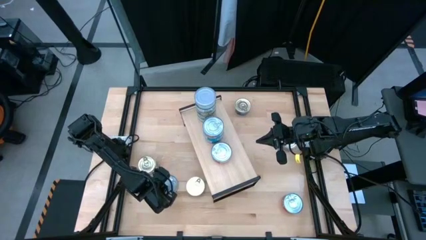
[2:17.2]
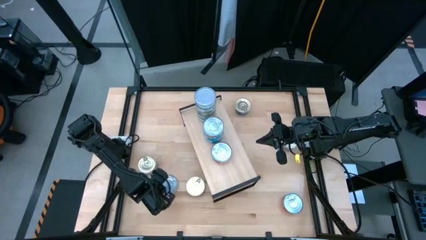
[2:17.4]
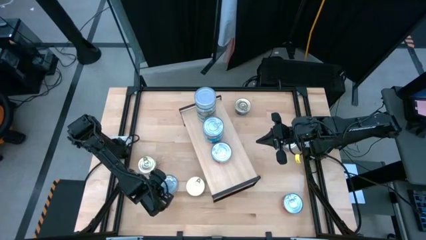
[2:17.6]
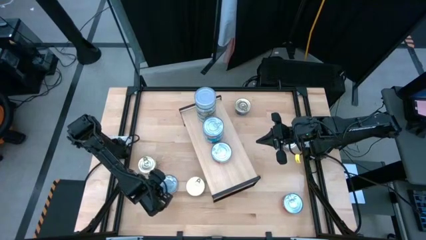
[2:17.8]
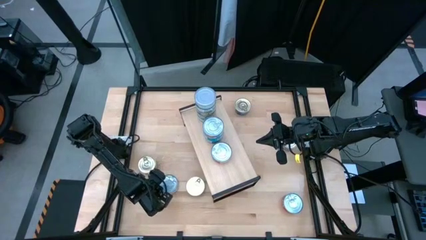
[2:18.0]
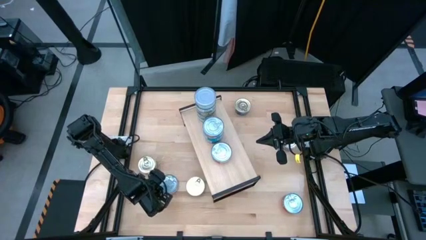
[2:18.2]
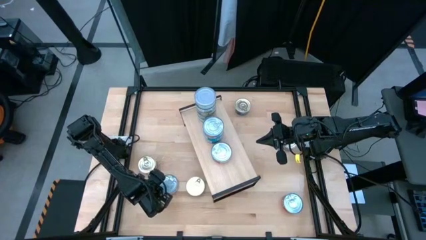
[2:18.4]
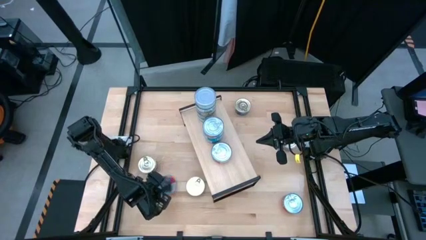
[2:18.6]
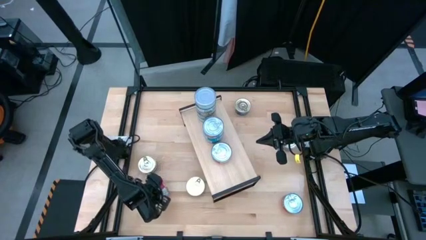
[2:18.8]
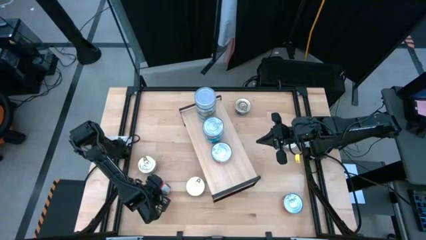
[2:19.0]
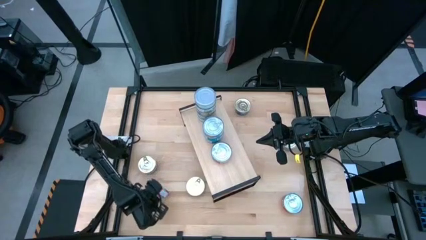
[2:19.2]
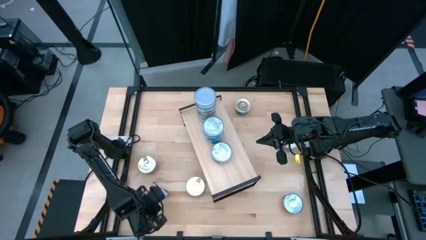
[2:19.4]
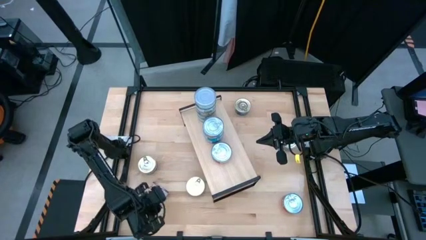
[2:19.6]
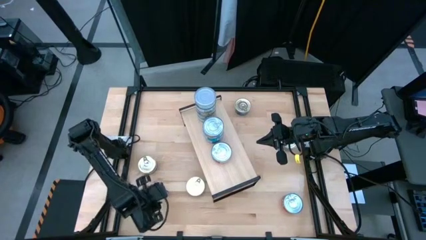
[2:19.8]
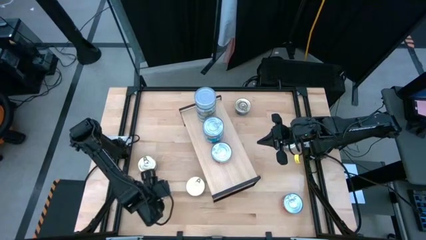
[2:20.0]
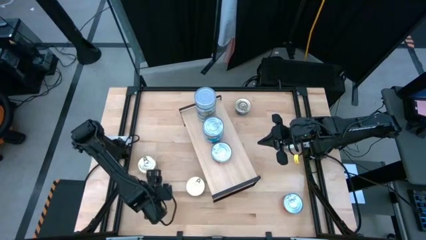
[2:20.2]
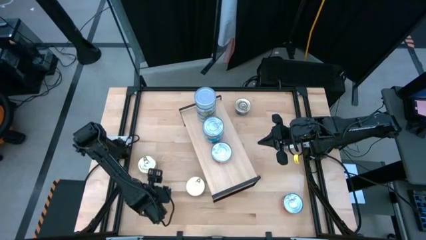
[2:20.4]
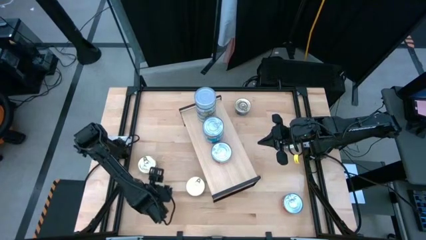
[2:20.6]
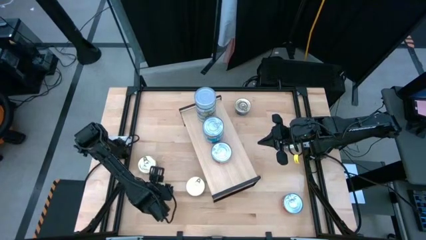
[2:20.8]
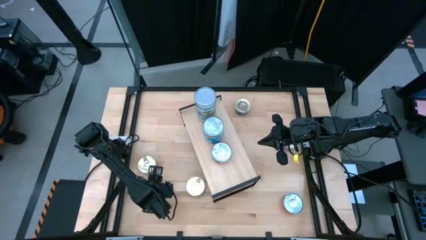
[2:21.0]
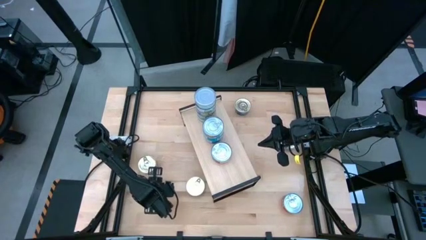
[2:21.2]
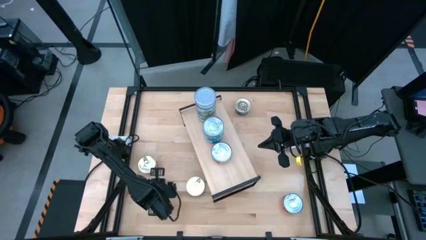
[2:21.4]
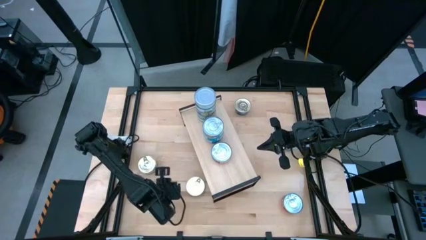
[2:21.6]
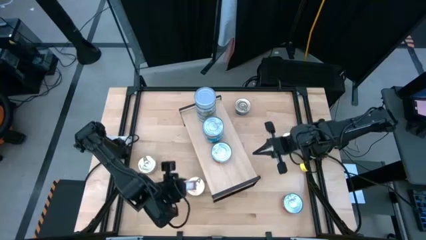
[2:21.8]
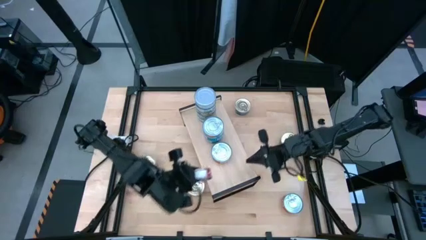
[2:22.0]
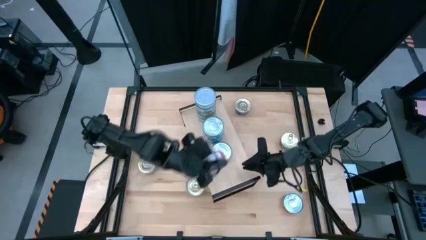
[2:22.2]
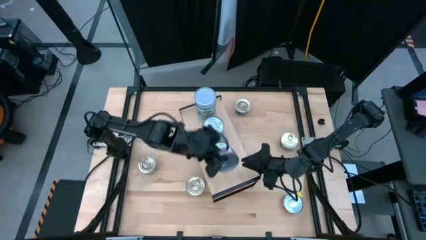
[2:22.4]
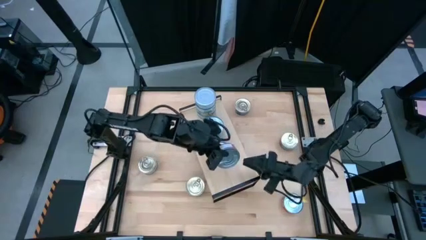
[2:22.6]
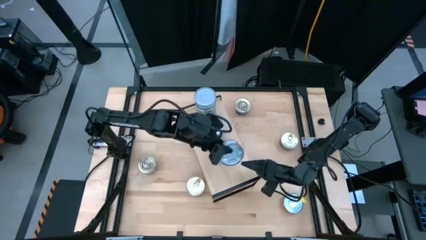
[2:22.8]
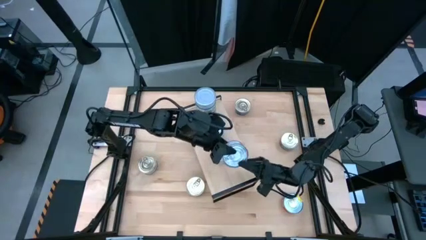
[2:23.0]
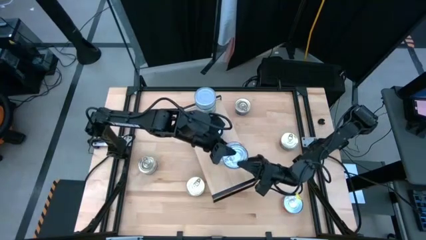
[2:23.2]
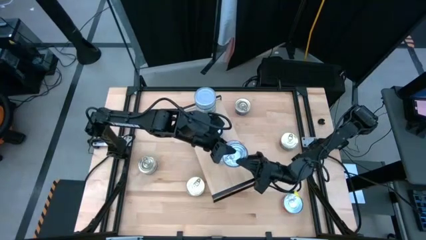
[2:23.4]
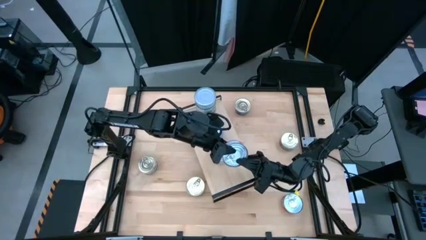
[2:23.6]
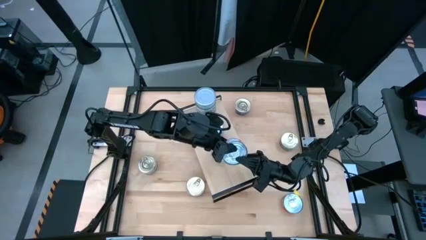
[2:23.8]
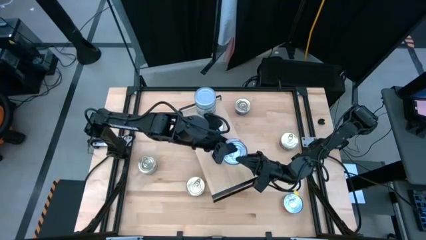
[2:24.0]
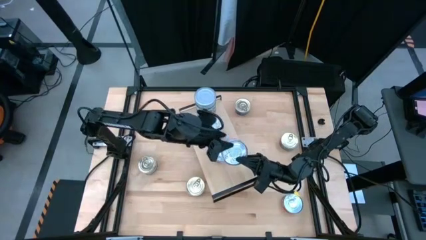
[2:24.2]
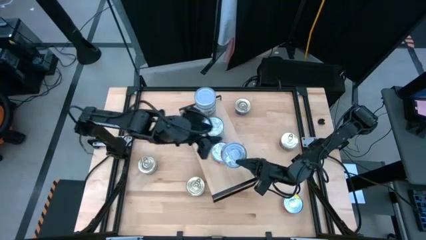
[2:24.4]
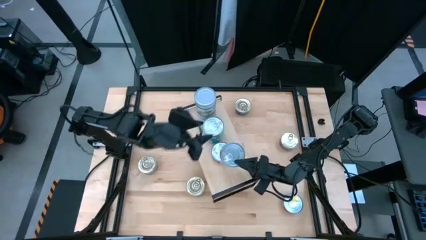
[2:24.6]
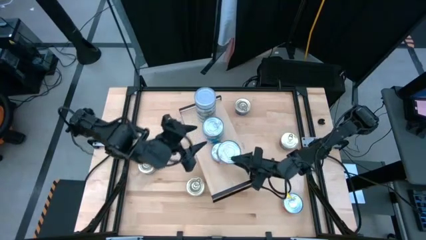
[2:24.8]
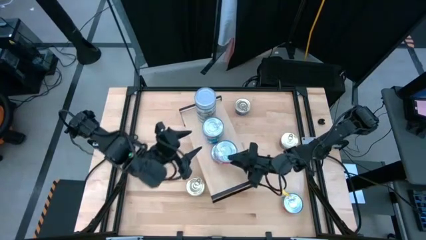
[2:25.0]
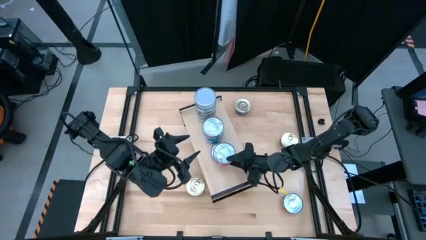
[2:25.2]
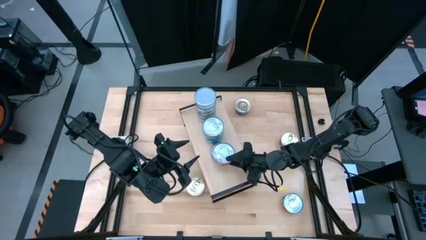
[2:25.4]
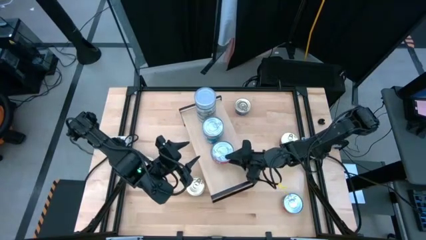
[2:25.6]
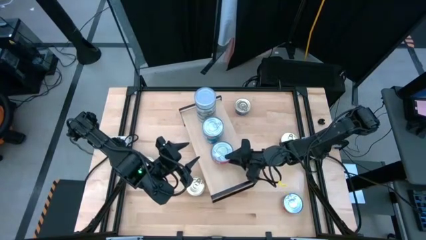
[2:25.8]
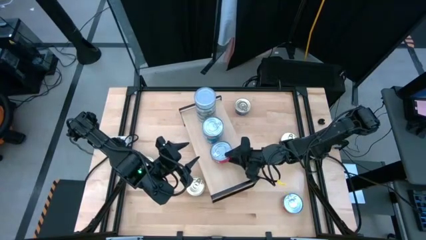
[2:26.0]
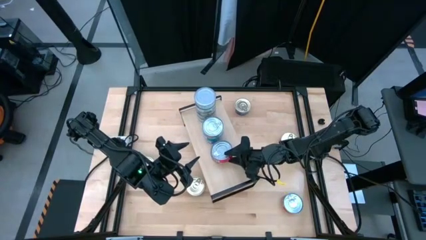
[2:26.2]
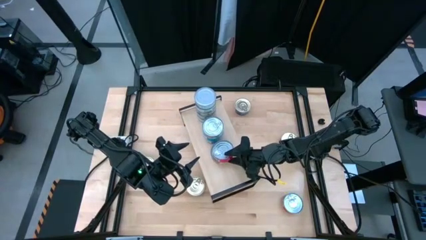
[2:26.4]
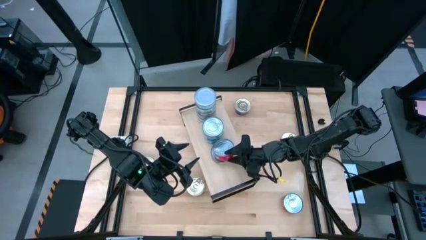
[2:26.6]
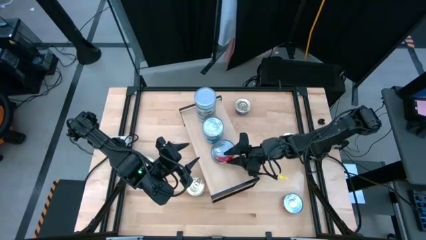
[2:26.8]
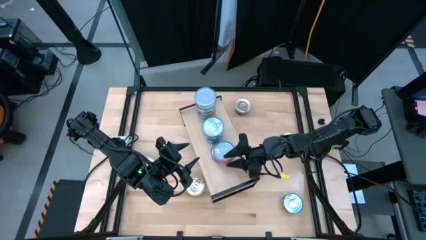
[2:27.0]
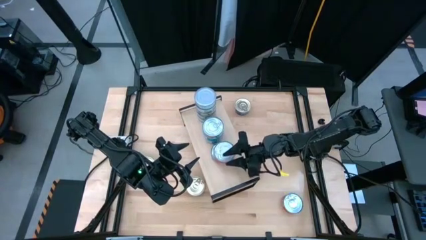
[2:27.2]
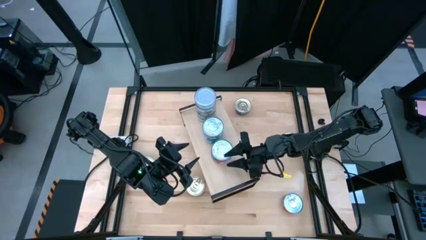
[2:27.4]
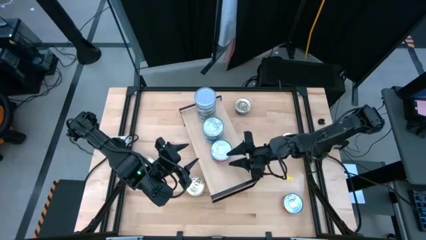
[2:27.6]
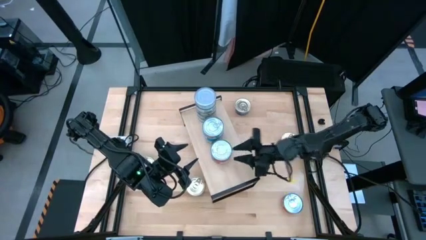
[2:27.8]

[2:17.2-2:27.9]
Task: Stack canned seafood by type on shelf
Stack the left red tuna can on top of the other red tuna can on the shelf
